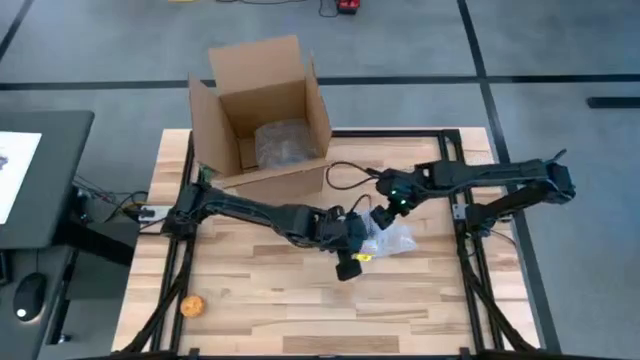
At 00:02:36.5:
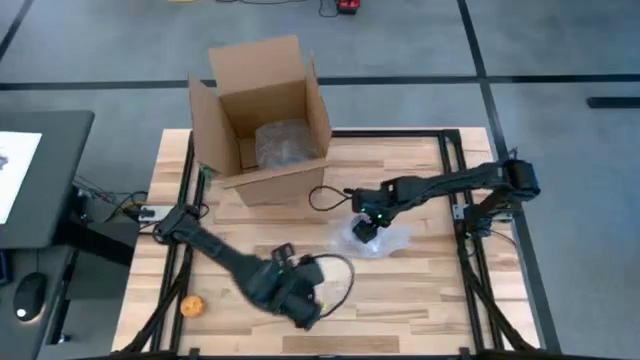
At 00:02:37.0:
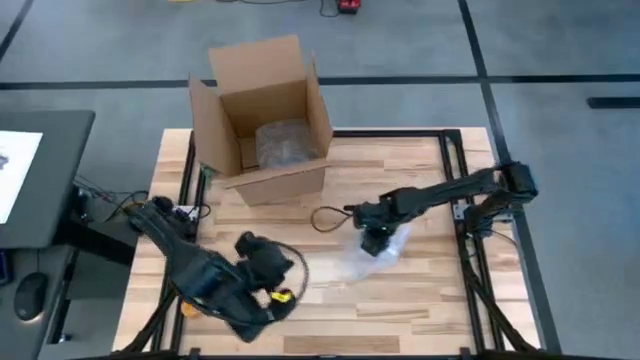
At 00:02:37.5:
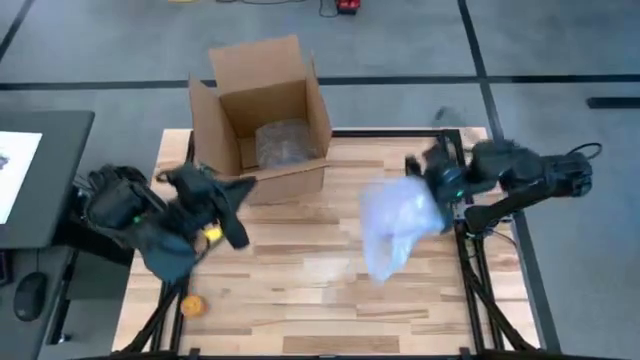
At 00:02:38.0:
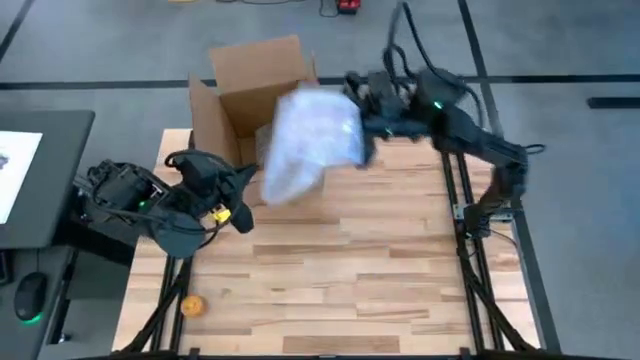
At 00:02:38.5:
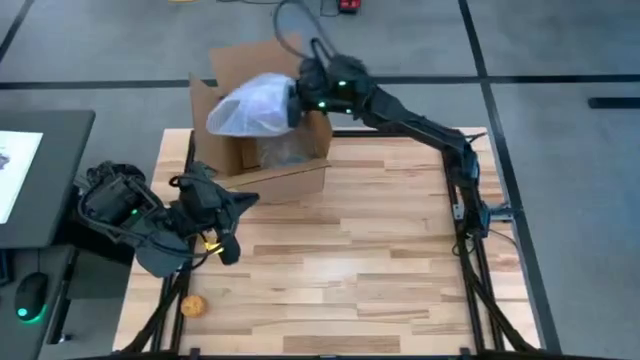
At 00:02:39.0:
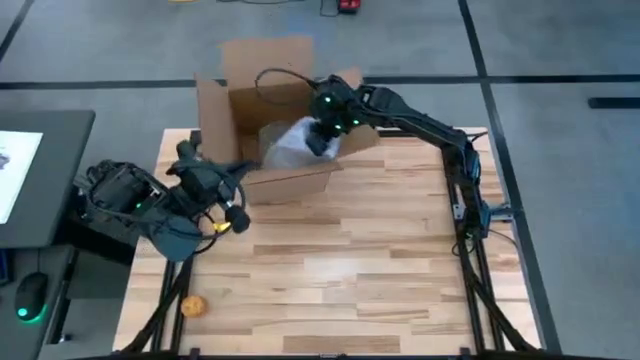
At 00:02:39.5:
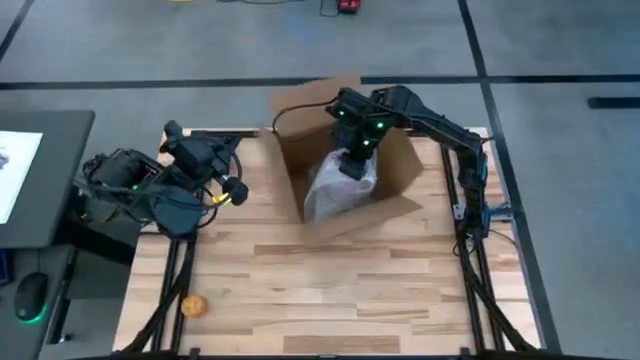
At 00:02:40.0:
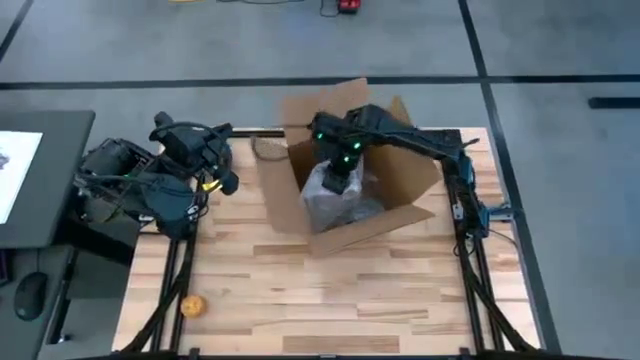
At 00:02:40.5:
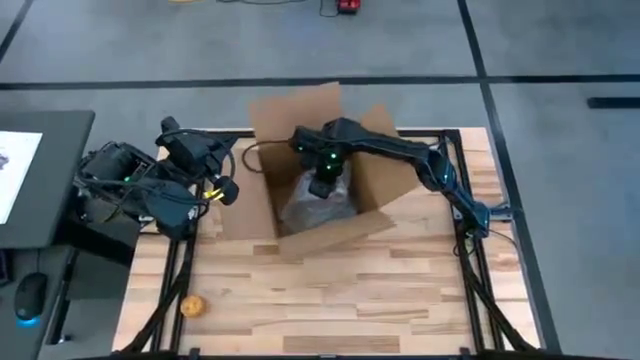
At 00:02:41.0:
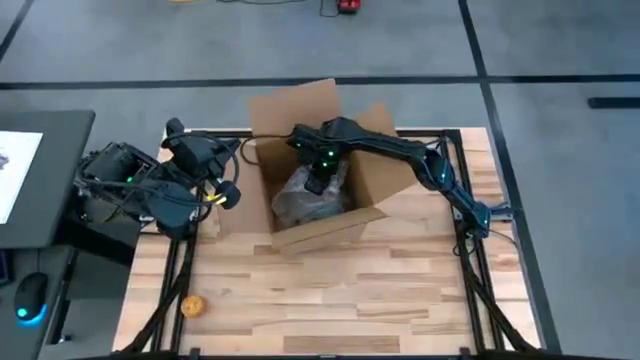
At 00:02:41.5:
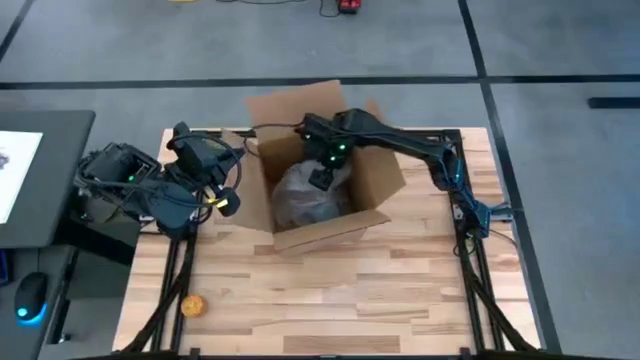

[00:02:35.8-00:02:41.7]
Task: wrap mug
Put the wrapped purple mug into the box

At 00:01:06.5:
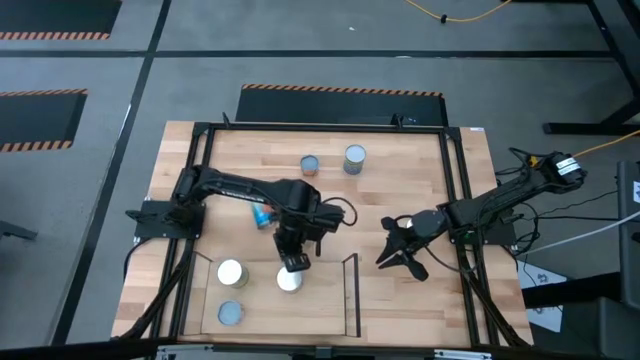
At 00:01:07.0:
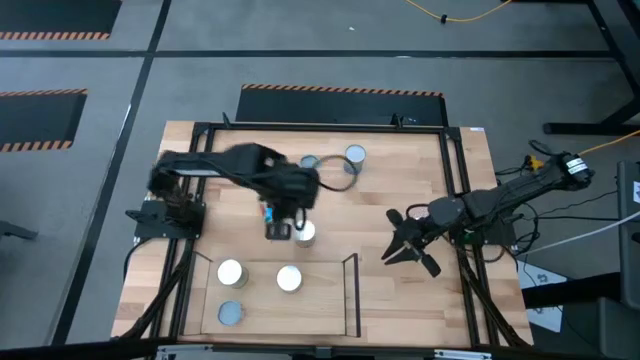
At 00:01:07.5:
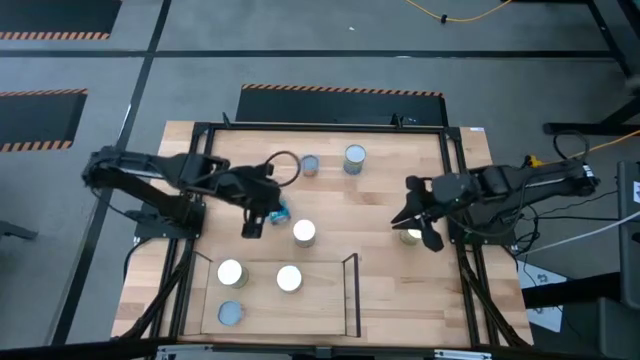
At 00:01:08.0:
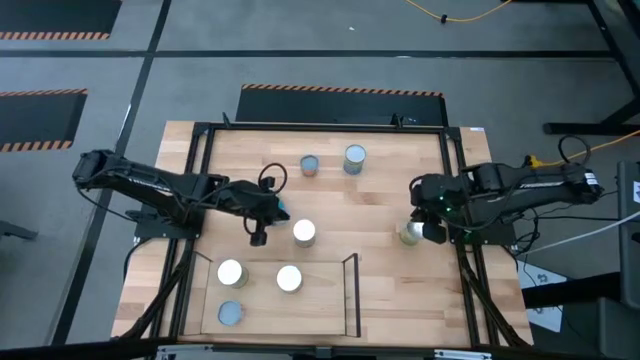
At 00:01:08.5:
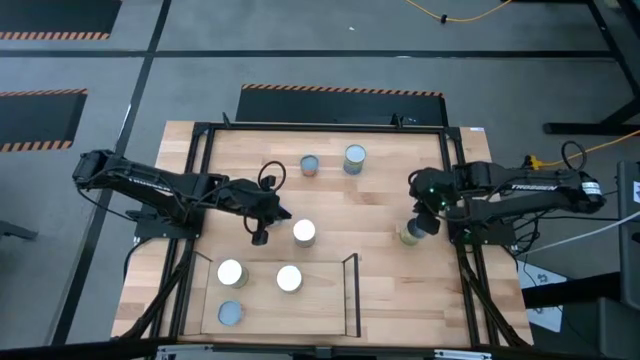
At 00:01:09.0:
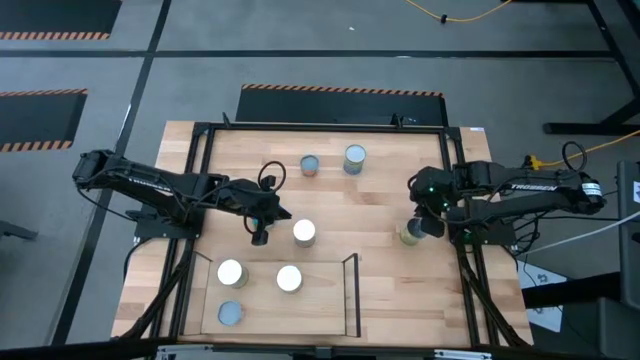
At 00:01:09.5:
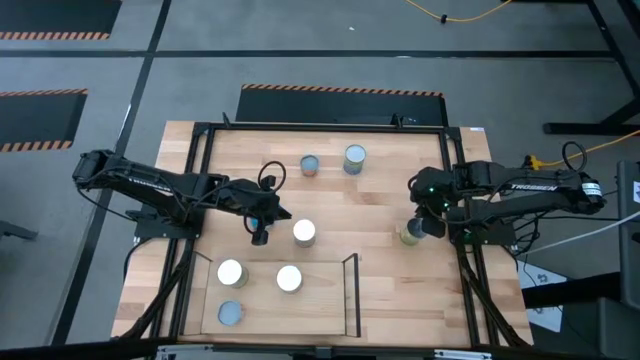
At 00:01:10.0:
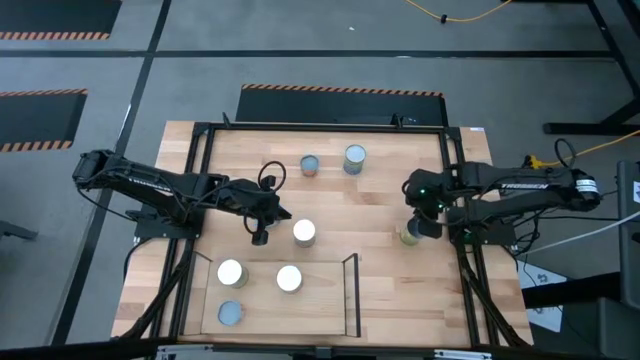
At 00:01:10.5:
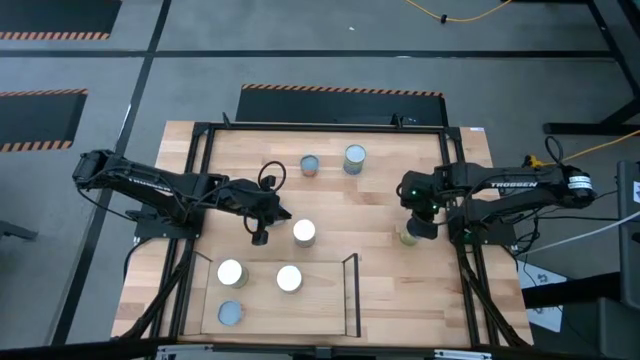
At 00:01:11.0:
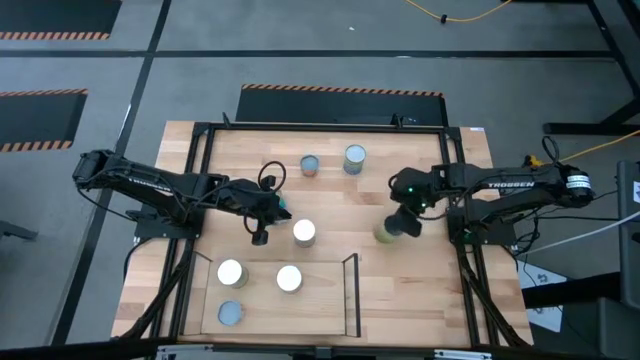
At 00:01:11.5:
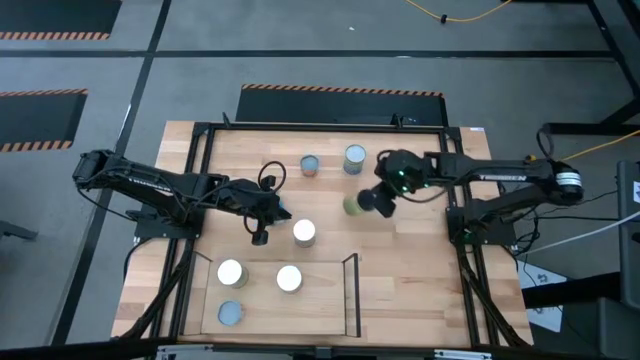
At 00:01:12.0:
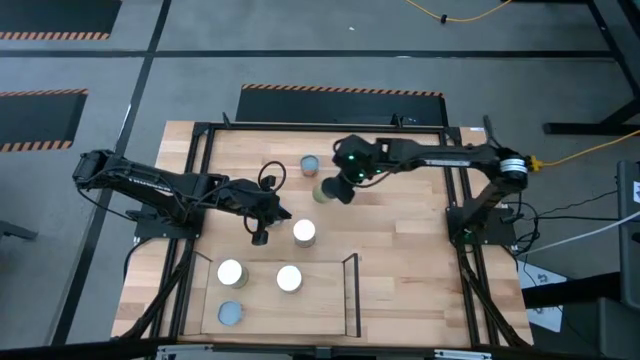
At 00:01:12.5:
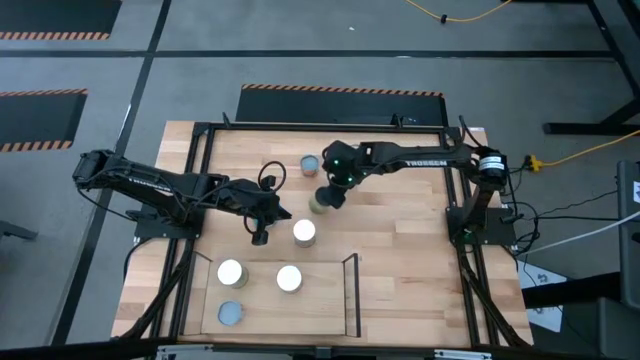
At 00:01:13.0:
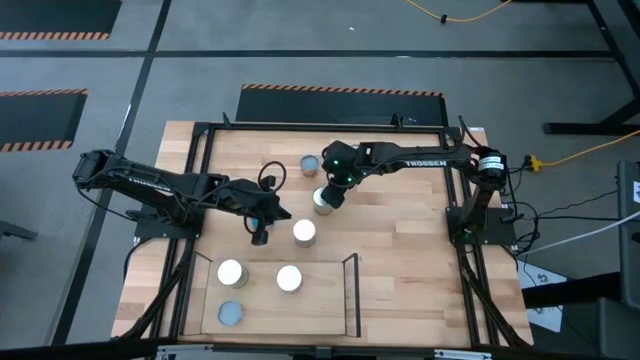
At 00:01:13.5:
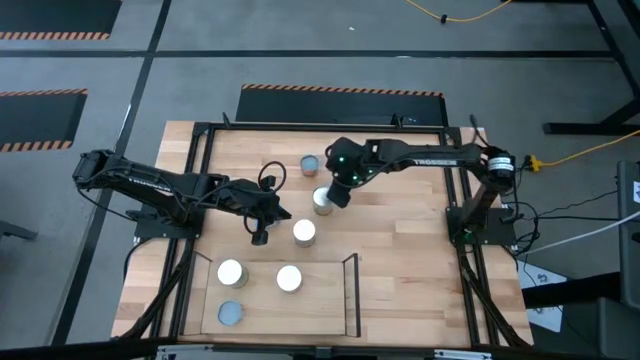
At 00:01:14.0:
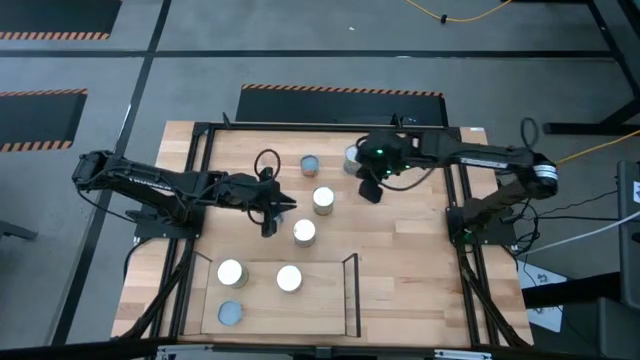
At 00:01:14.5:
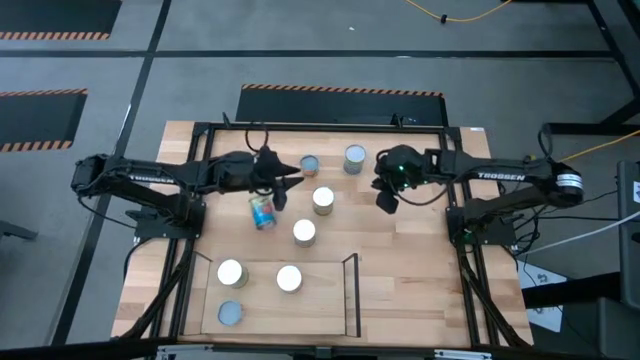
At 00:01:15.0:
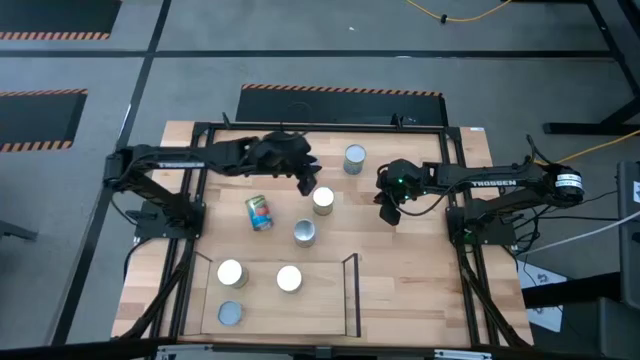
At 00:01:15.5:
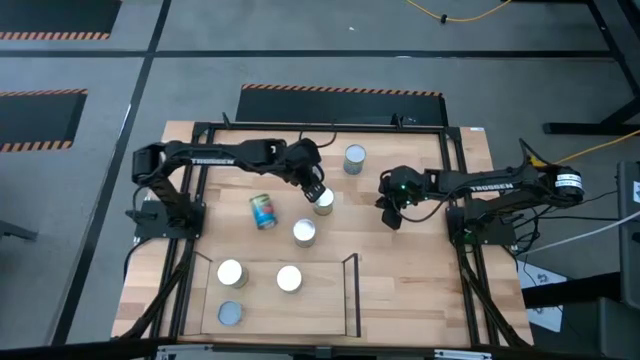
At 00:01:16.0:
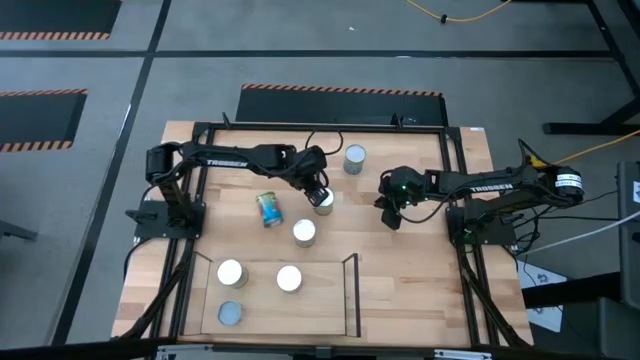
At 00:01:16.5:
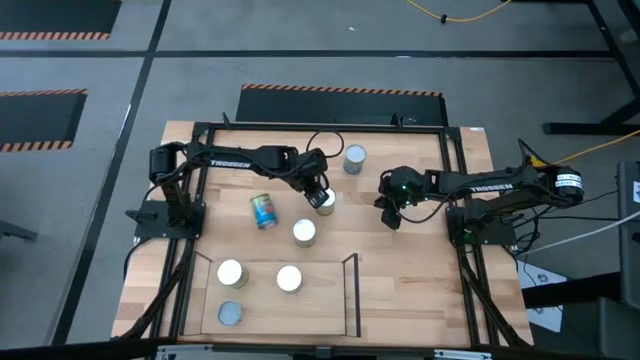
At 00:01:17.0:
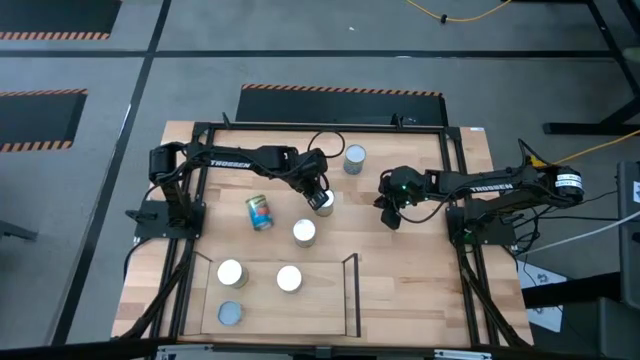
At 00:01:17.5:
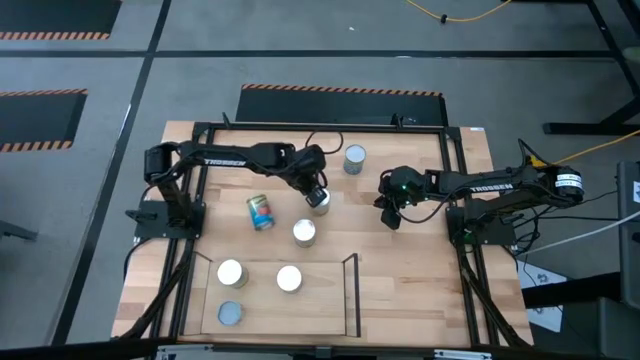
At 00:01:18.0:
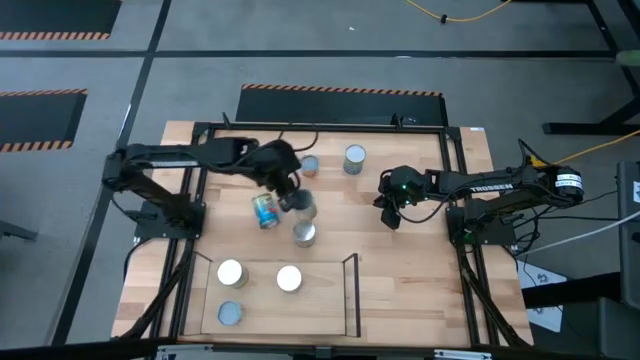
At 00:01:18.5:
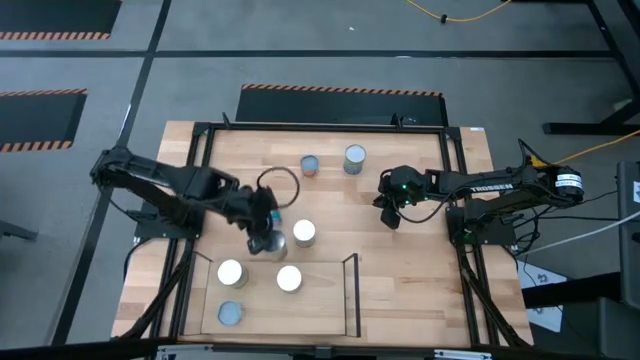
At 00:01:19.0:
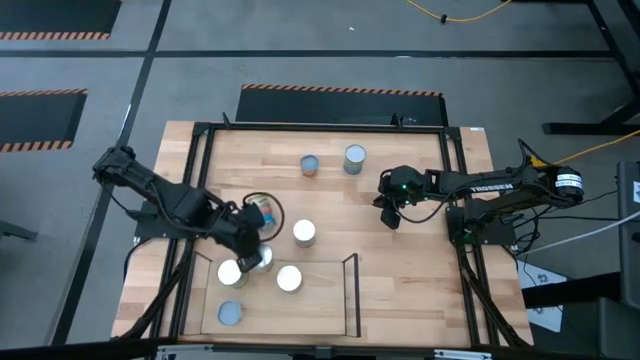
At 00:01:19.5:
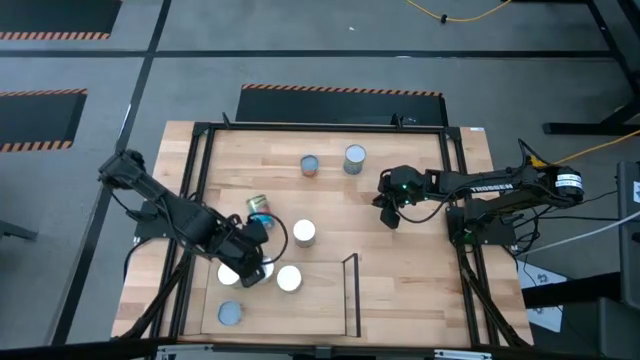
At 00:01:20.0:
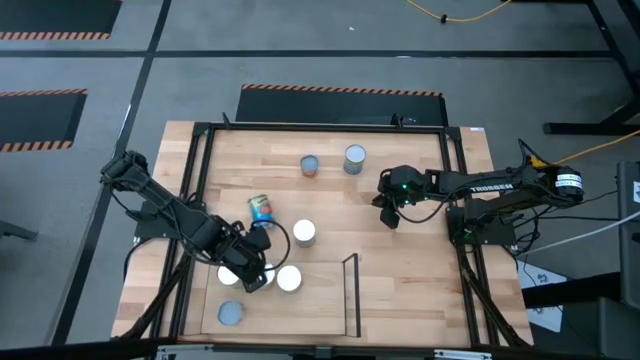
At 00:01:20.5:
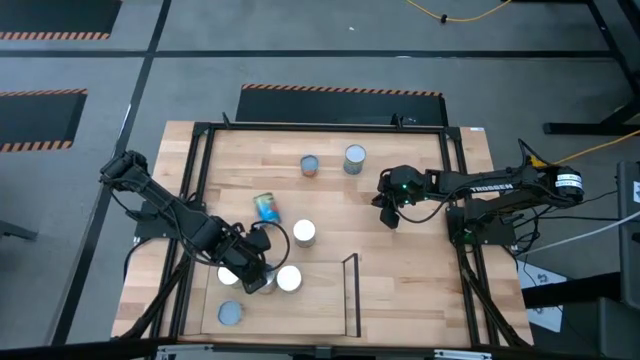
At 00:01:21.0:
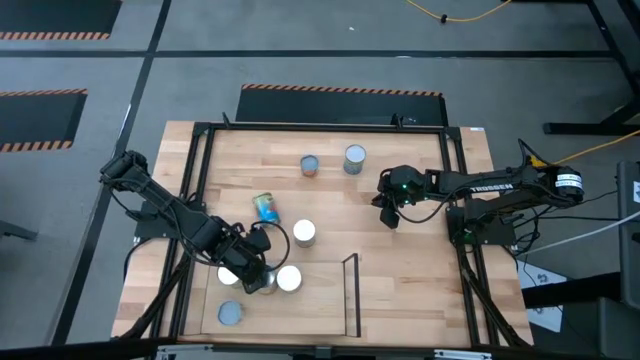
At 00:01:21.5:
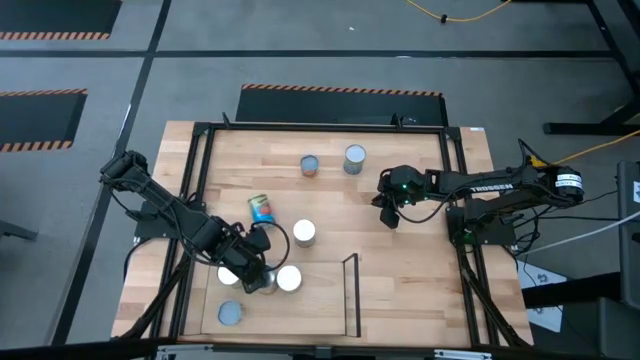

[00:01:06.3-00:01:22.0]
Task: Pick and place cans onto a shelf
Move the canned orange on the shelf
